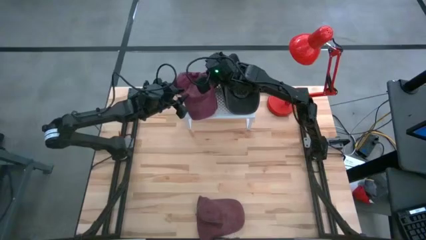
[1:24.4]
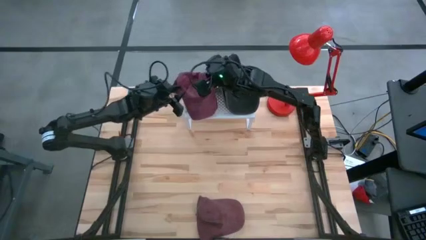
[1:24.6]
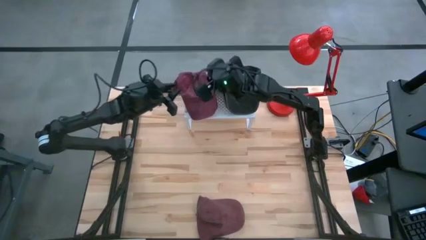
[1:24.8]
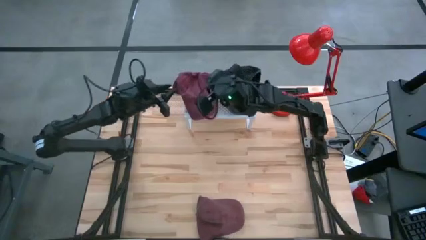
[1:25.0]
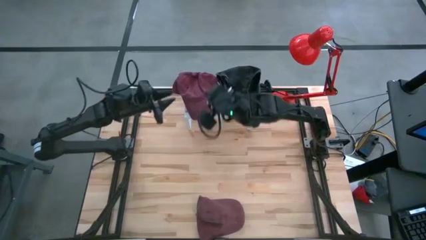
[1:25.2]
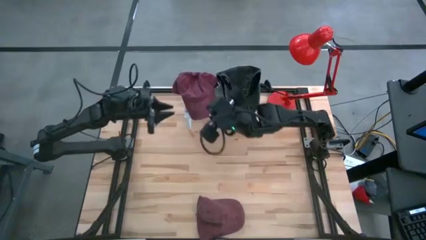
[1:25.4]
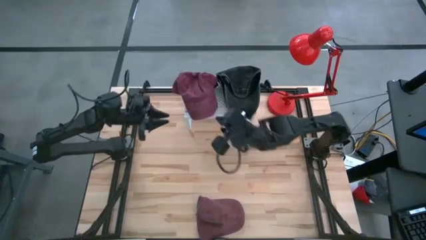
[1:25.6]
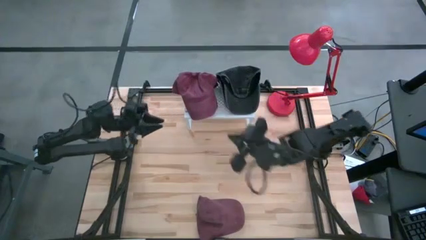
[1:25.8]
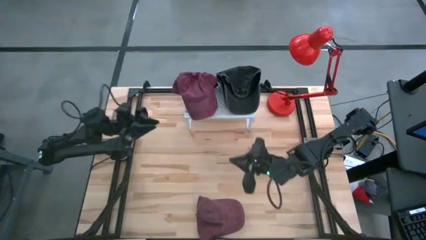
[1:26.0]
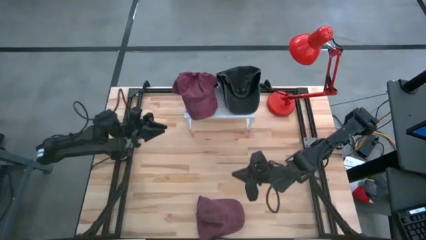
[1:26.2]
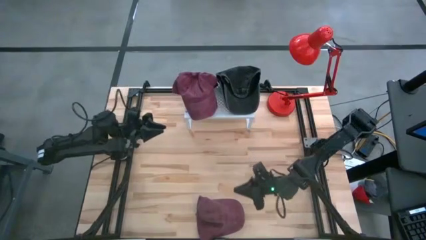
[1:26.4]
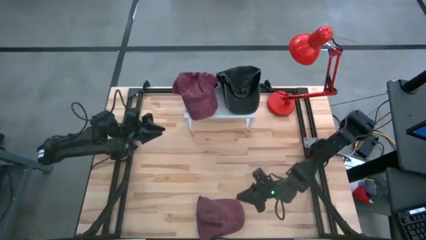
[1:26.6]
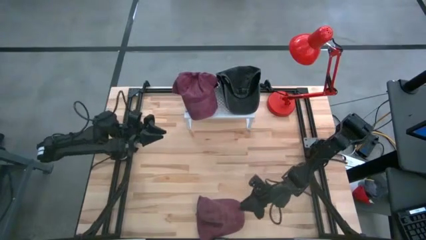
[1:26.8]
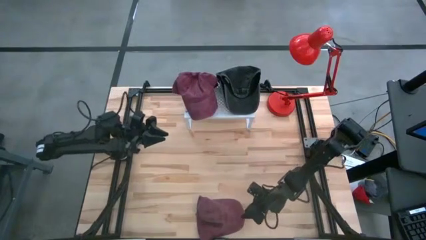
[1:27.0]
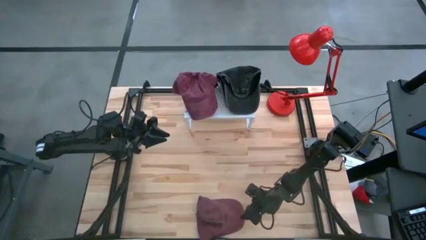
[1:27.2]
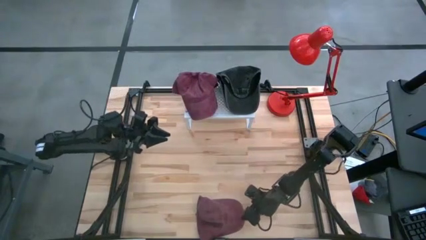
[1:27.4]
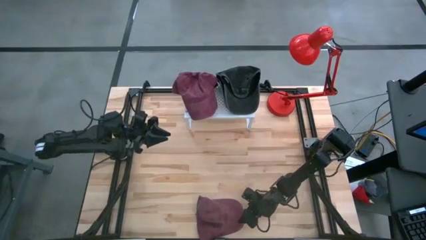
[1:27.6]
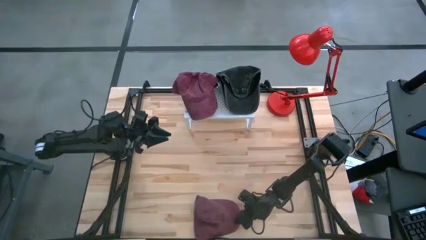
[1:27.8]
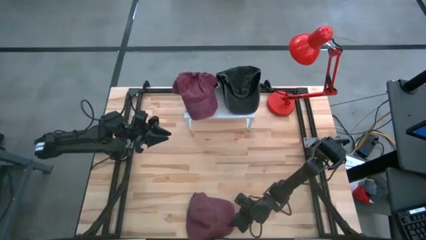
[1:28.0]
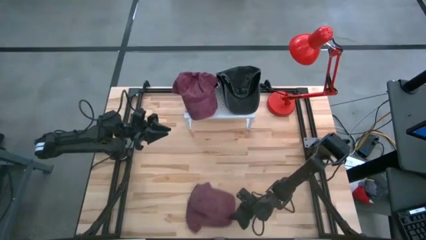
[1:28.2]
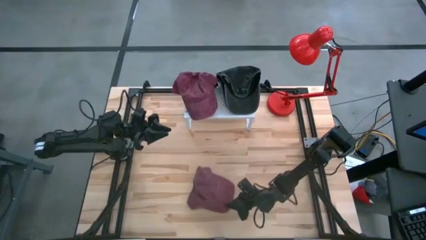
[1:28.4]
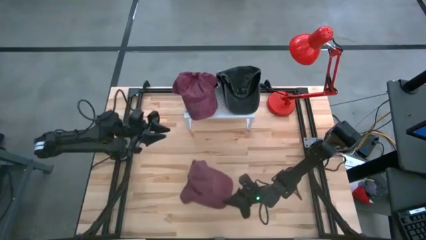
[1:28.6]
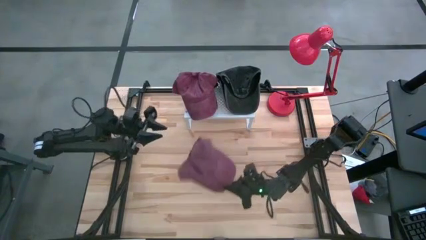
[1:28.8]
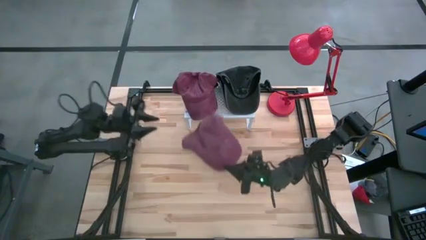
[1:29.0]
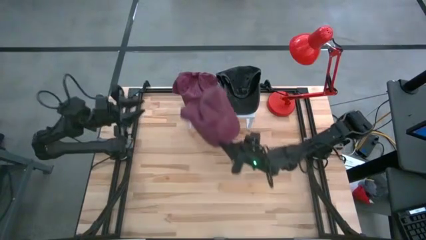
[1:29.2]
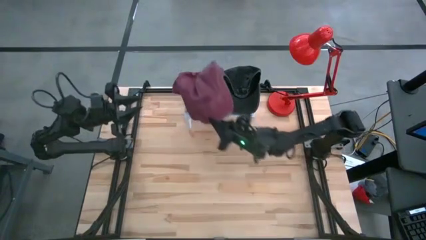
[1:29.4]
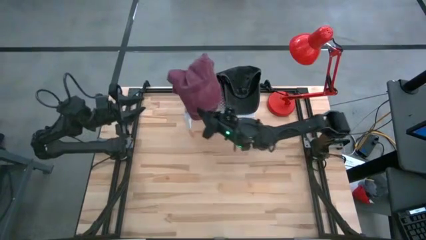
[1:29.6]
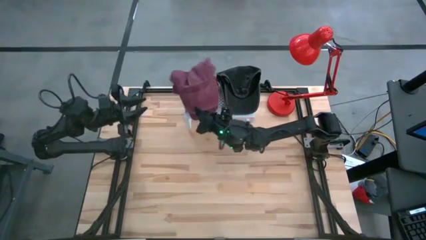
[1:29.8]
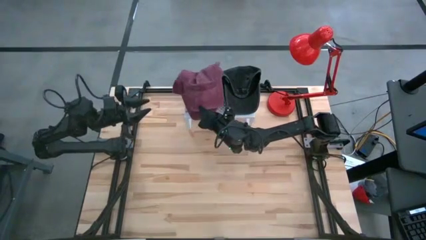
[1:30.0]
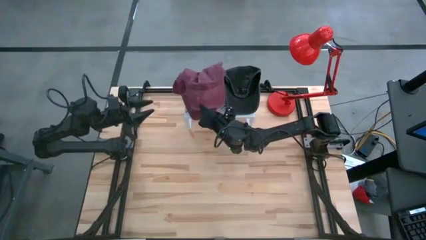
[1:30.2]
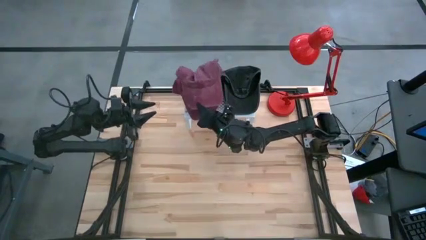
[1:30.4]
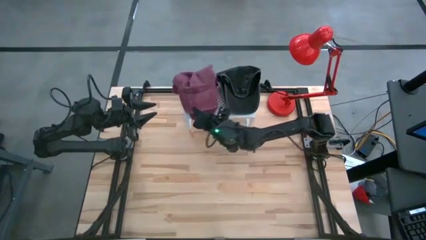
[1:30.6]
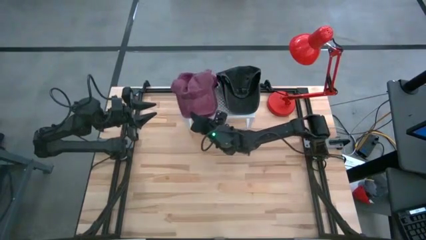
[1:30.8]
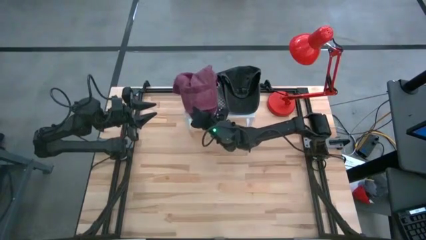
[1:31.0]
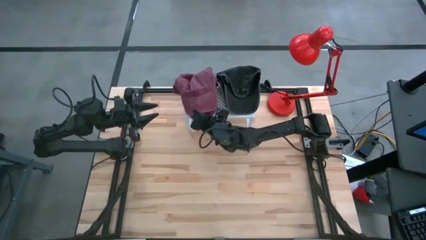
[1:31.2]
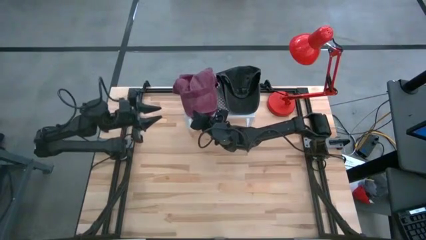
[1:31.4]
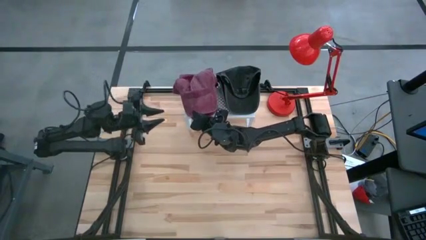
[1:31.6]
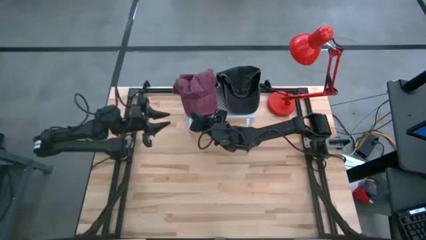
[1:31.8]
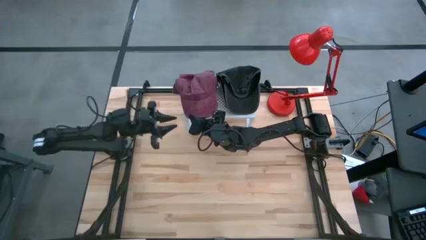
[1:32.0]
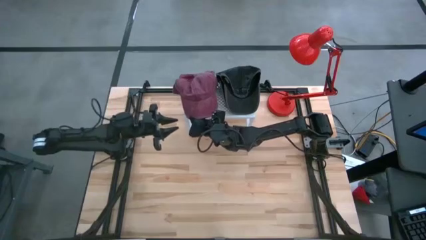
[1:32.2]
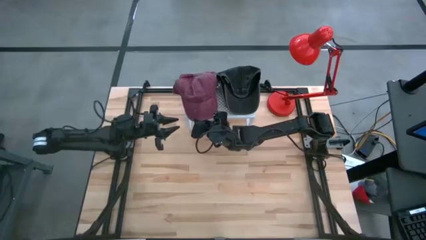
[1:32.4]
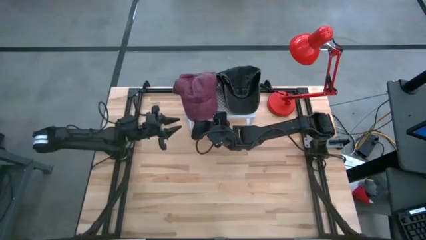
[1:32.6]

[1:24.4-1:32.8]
Task: Pick & Place hat
Stack the red cap on the red caps on the shelf

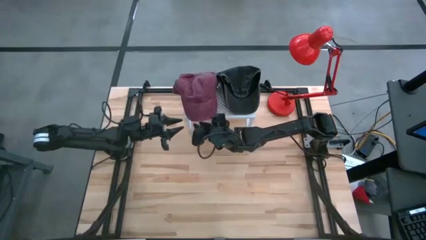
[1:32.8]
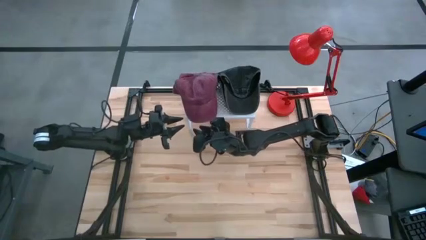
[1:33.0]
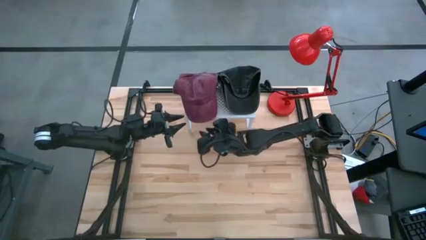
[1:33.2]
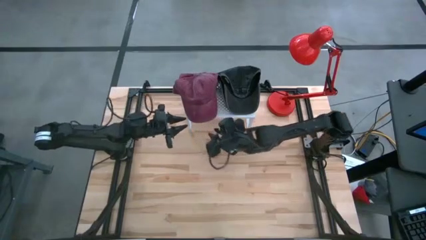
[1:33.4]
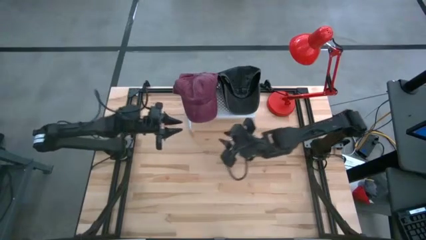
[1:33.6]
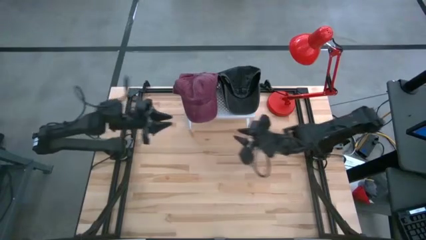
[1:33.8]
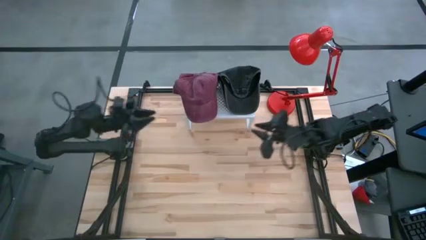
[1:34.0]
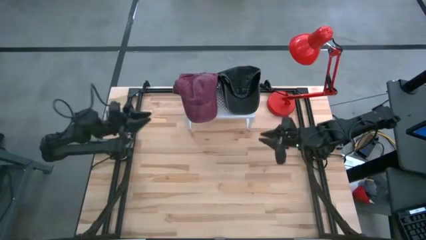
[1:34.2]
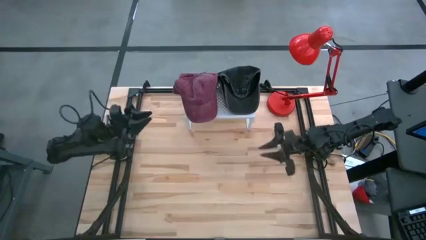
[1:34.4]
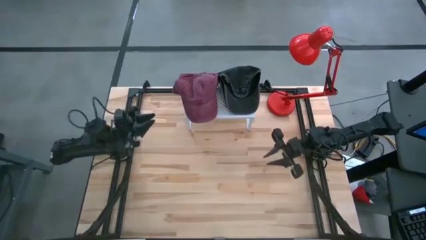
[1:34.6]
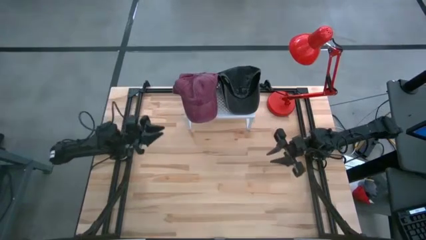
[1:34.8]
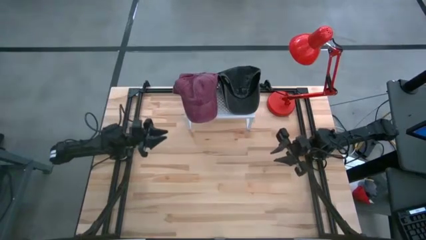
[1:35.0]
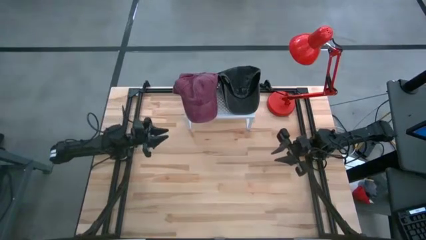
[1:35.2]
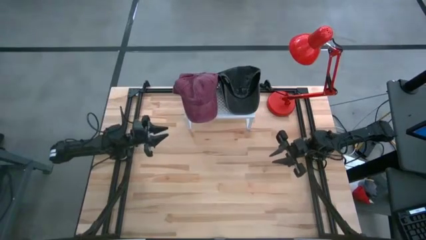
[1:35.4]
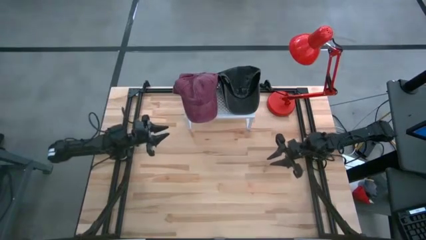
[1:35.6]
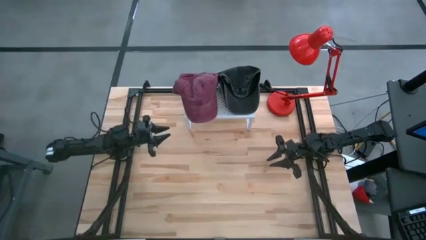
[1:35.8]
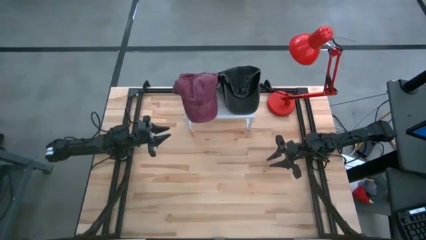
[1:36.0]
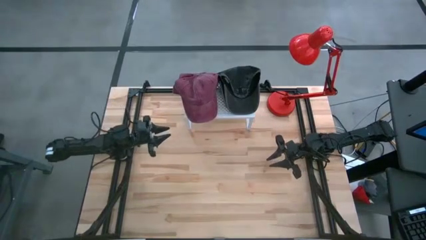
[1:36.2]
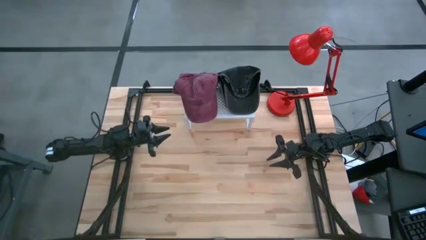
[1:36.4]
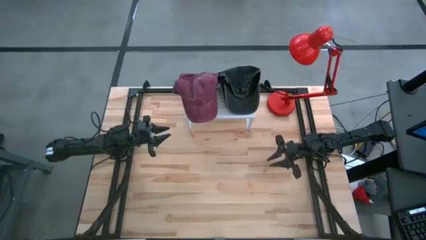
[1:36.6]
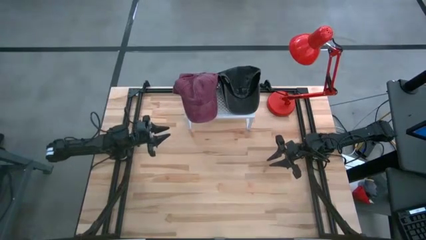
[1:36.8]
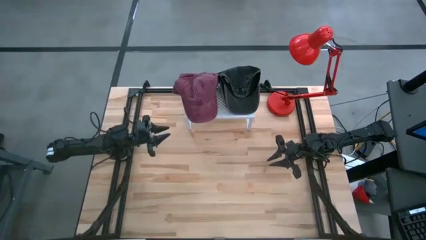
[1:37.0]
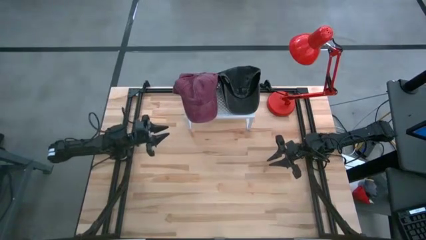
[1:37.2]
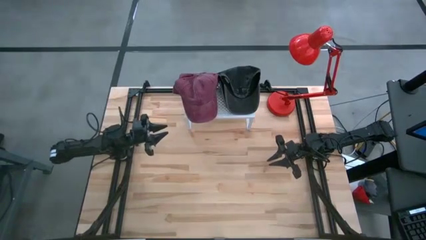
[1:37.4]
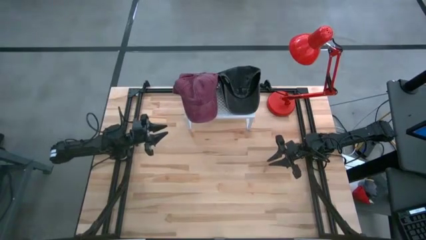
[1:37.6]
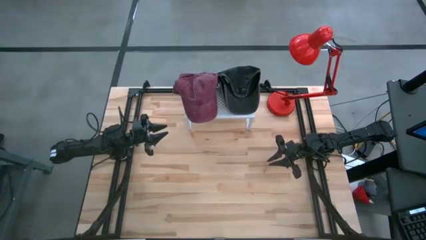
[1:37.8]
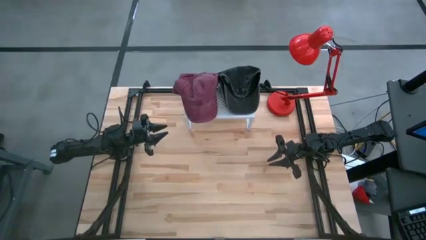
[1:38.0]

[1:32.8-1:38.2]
Return to Home Position

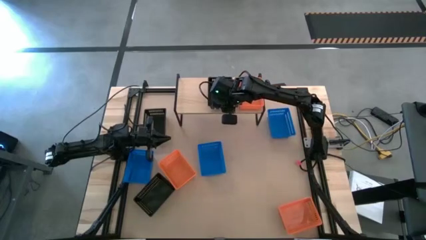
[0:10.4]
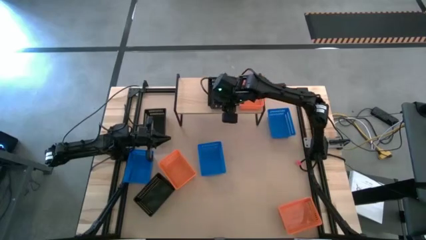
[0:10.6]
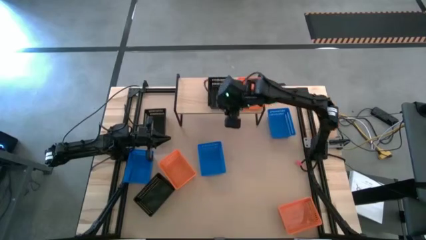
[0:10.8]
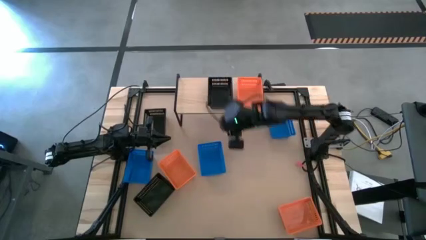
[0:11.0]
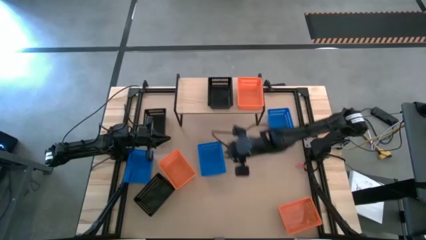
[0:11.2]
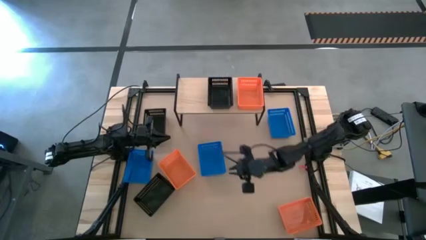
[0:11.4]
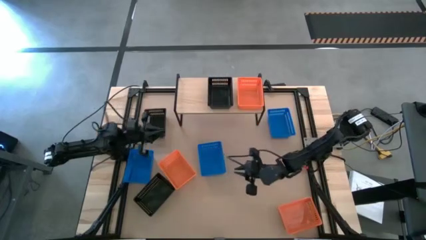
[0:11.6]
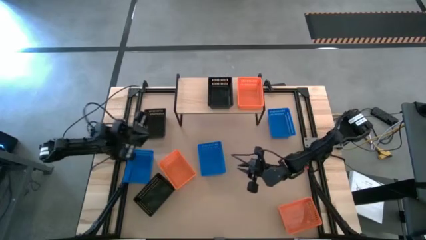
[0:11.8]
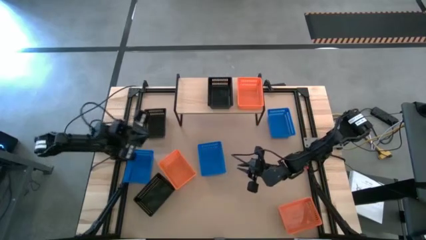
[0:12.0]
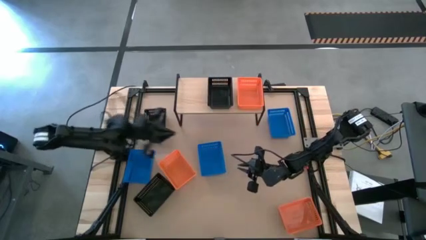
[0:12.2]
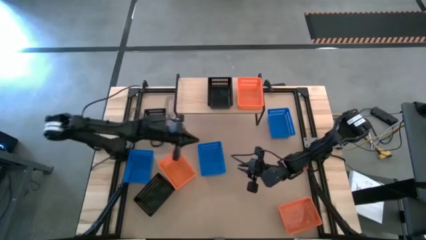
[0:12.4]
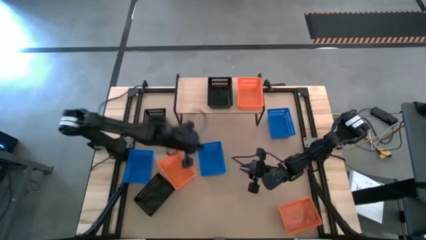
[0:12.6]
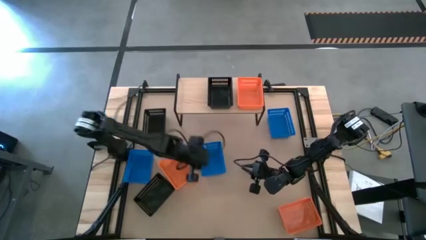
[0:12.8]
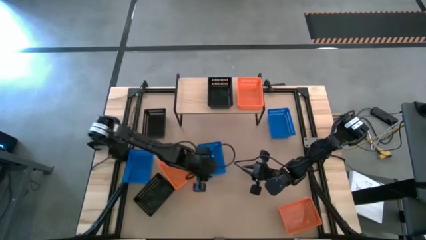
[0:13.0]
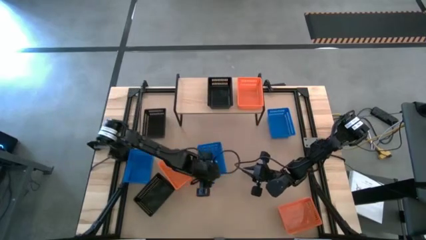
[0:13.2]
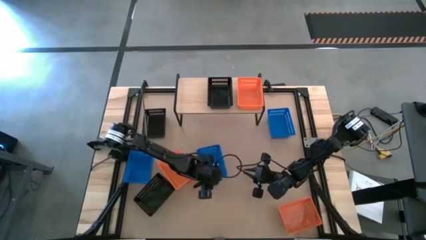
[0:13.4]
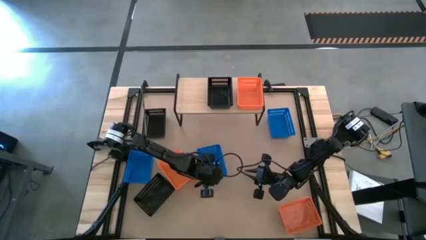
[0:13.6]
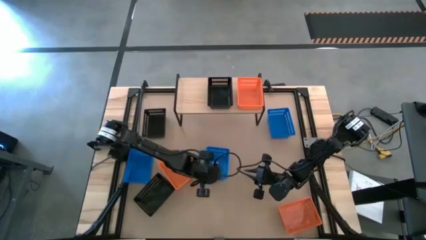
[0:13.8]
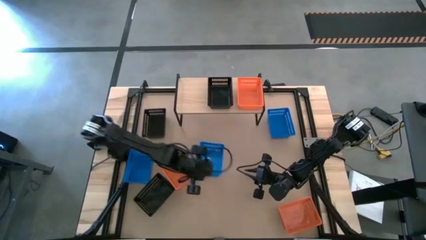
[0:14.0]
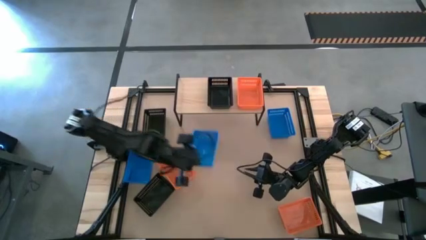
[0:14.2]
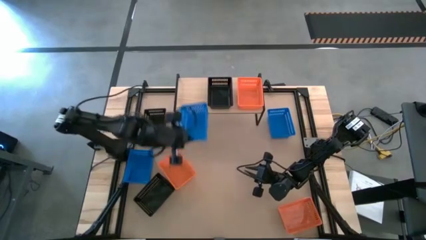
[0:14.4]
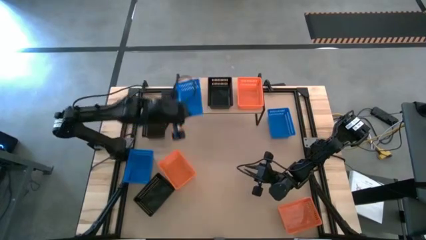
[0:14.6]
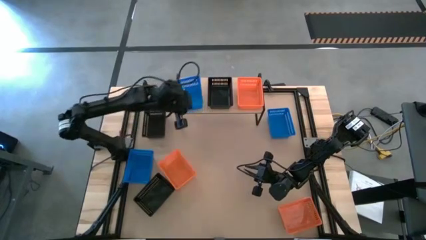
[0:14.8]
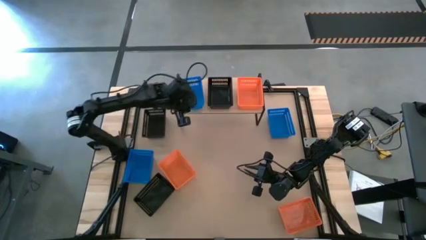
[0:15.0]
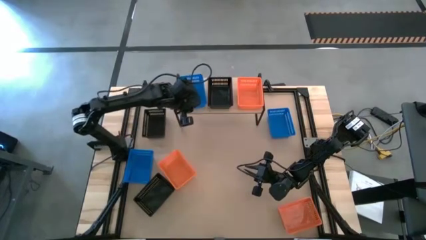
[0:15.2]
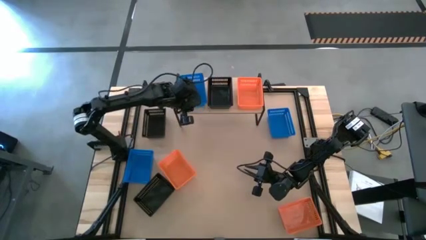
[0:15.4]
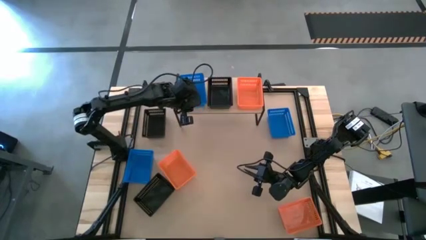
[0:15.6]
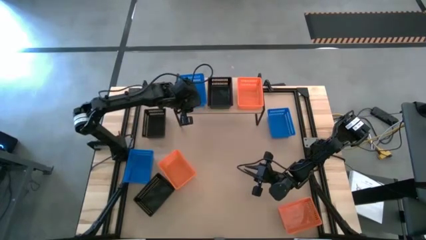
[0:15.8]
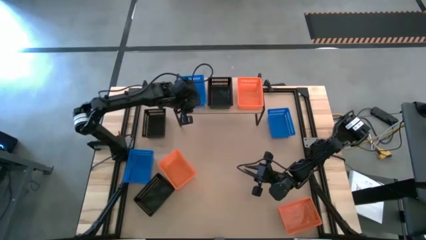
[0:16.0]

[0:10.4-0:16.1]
Task: Stack baskets on shelf by color
Put the middle blue bin on the shelf
